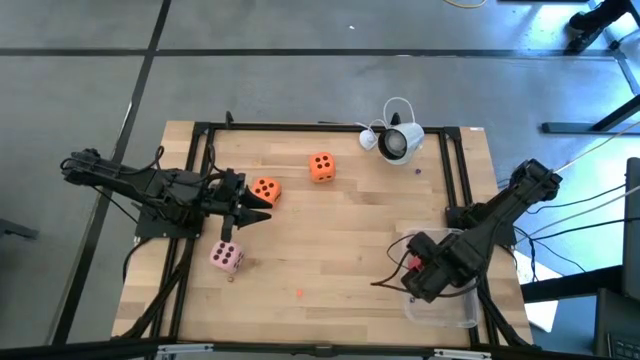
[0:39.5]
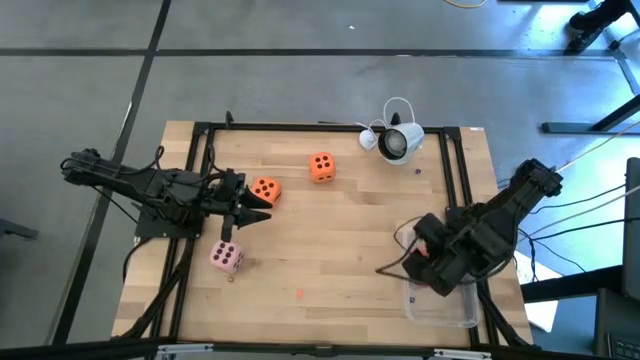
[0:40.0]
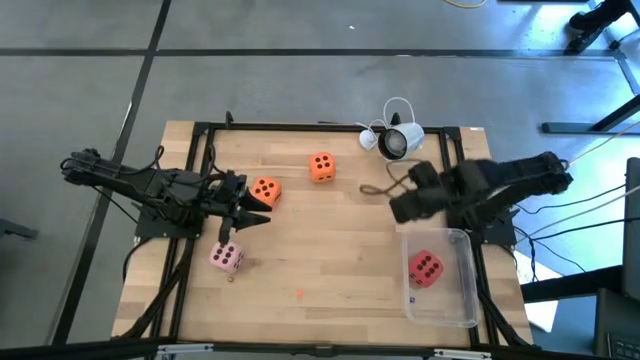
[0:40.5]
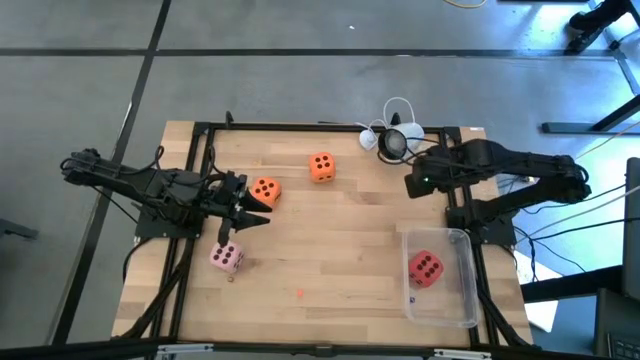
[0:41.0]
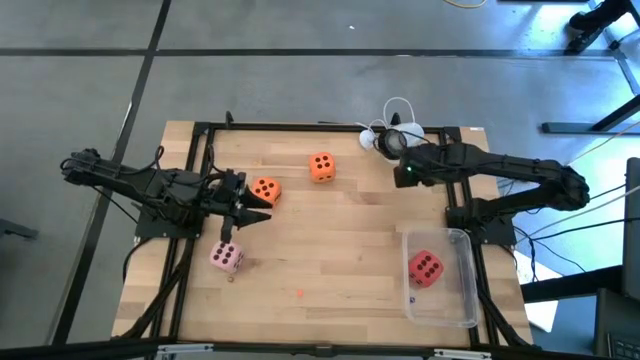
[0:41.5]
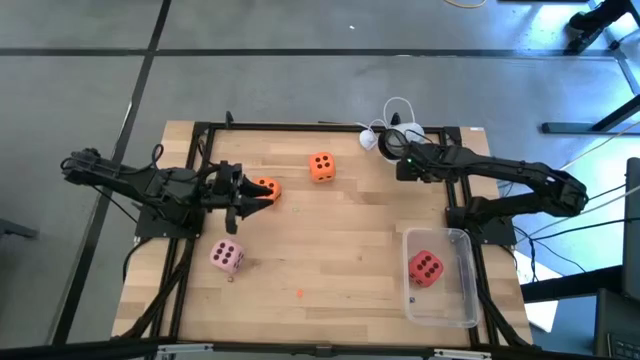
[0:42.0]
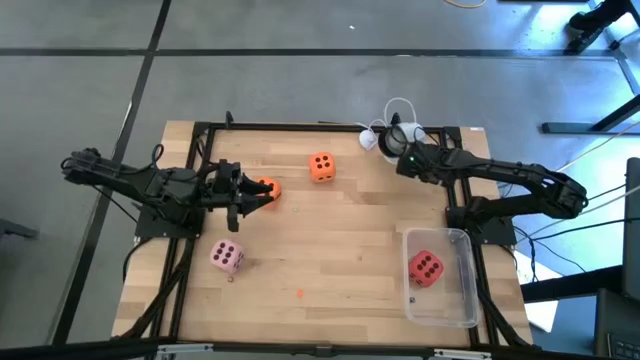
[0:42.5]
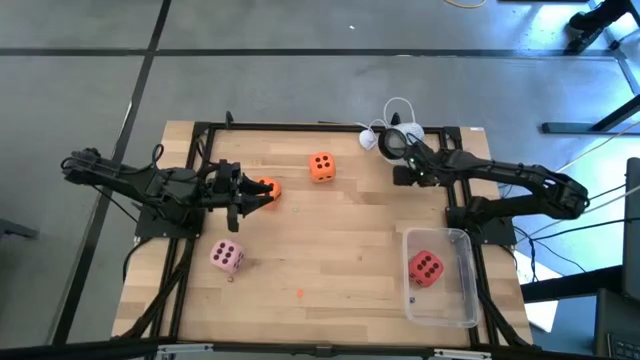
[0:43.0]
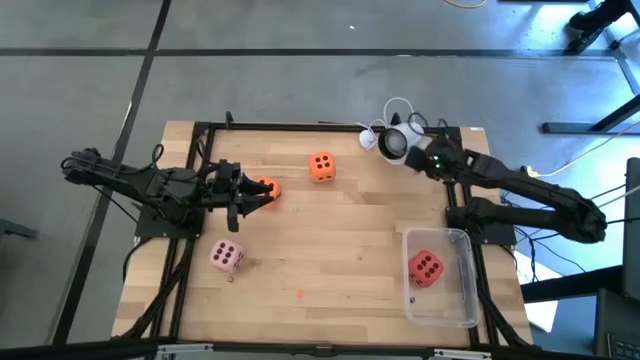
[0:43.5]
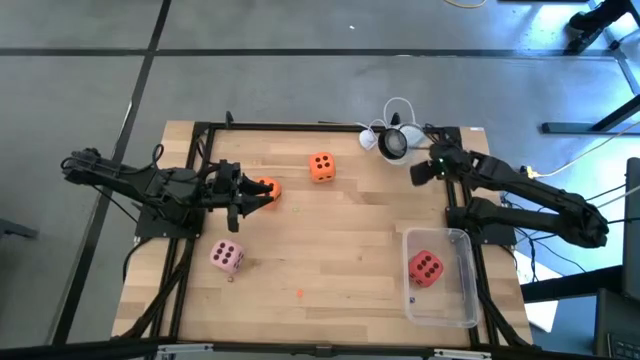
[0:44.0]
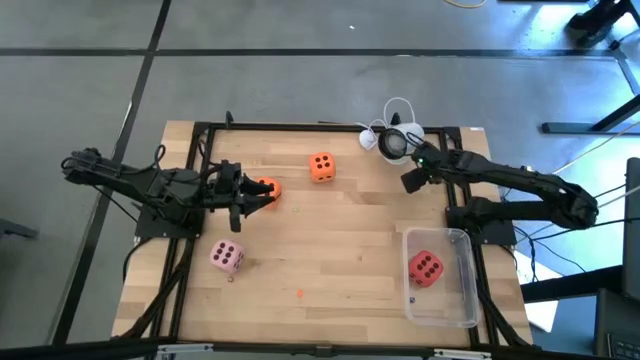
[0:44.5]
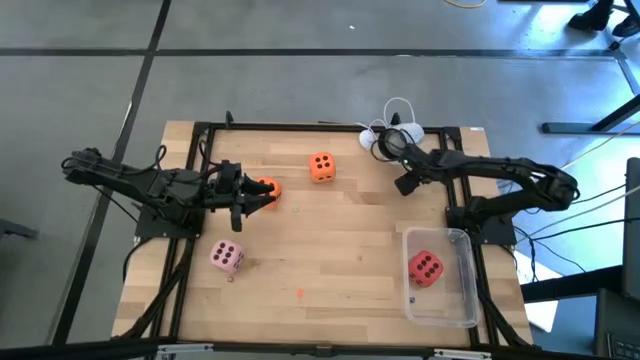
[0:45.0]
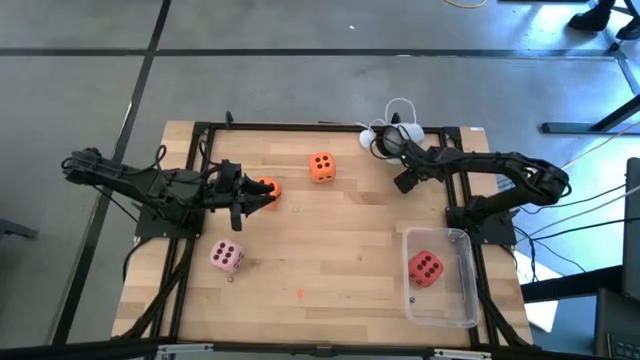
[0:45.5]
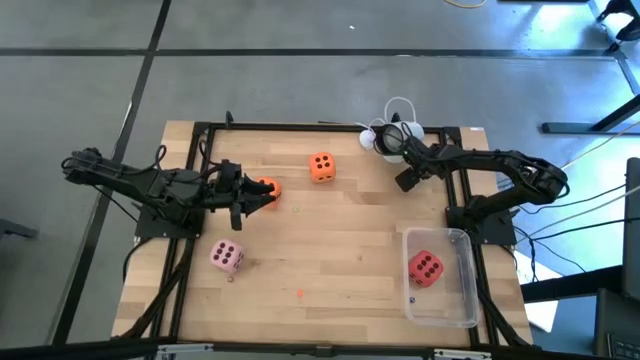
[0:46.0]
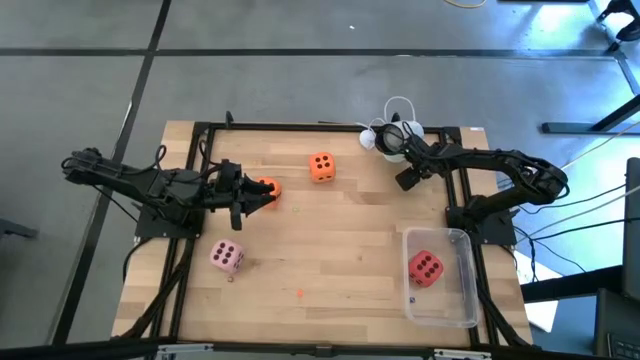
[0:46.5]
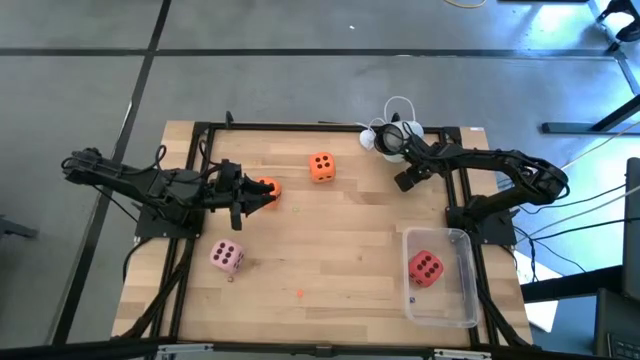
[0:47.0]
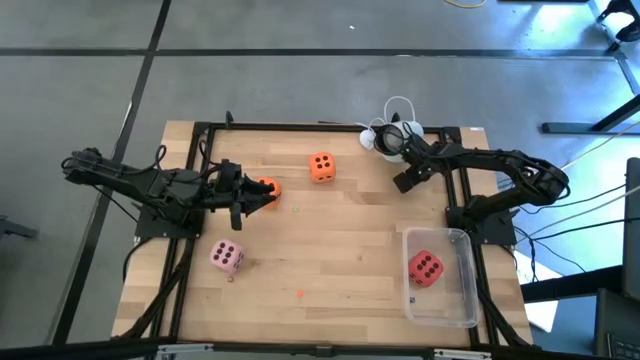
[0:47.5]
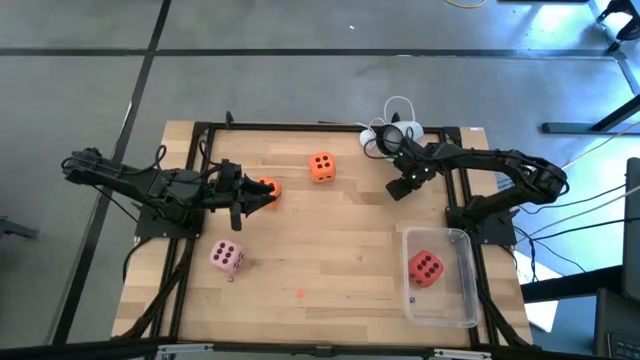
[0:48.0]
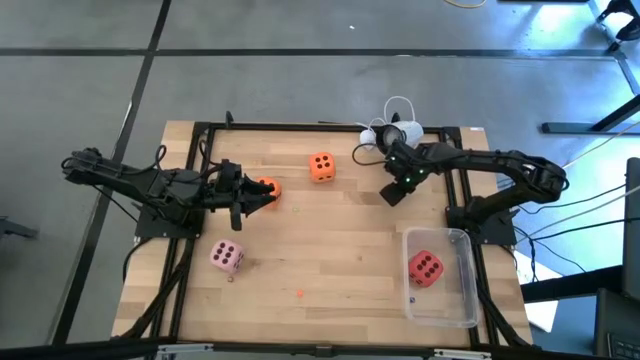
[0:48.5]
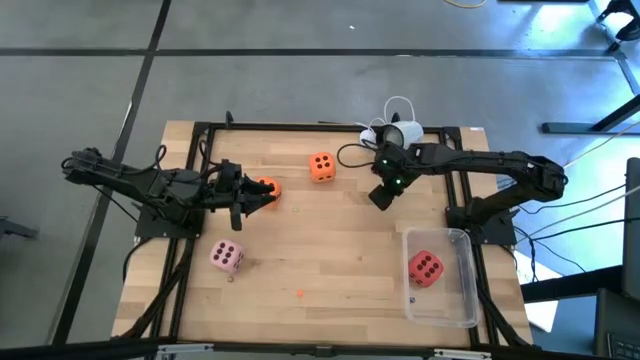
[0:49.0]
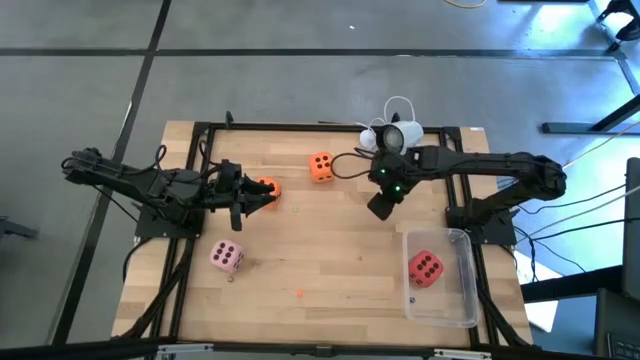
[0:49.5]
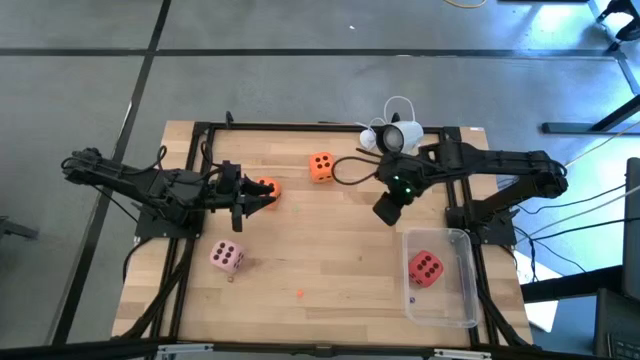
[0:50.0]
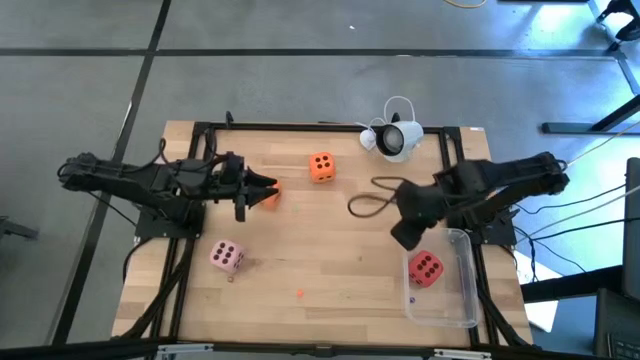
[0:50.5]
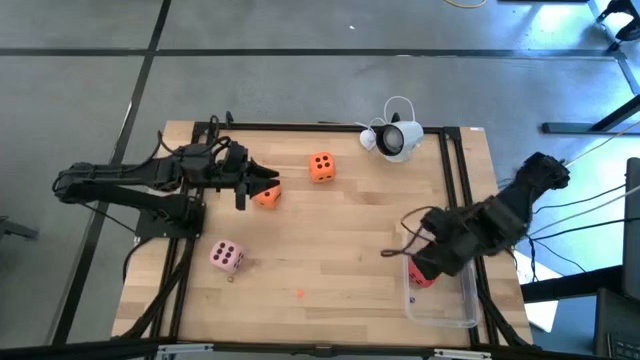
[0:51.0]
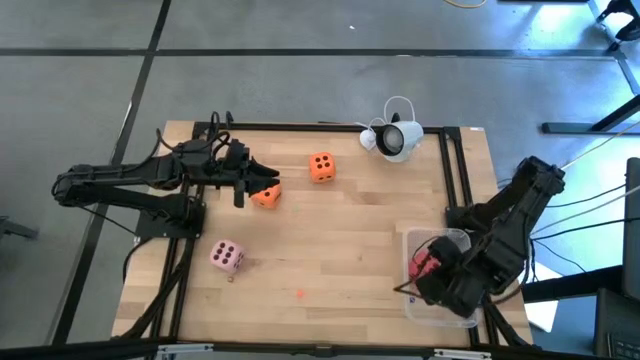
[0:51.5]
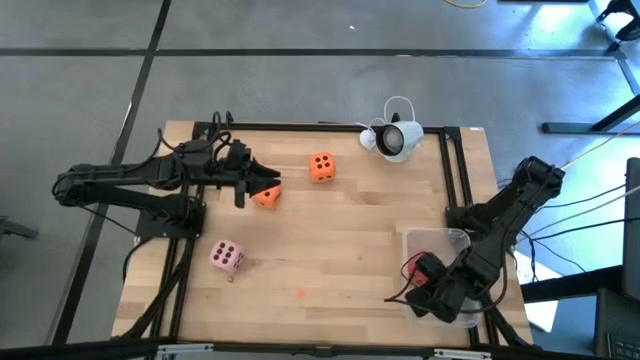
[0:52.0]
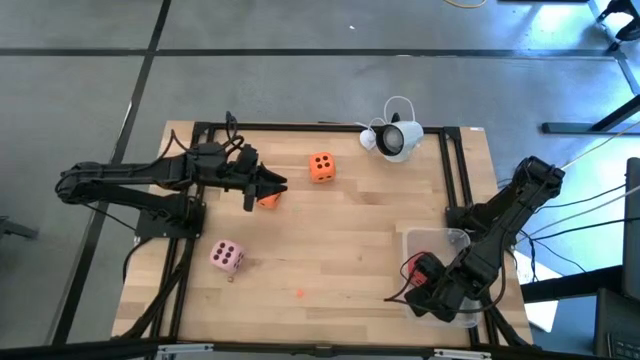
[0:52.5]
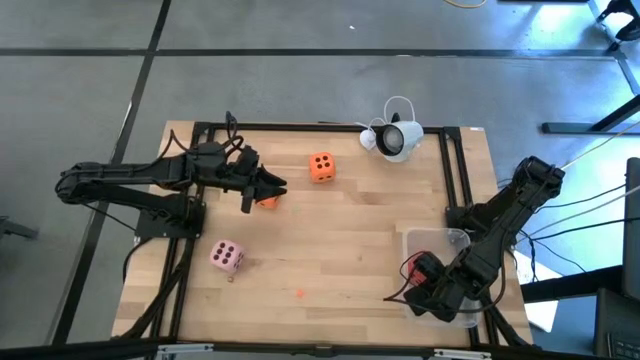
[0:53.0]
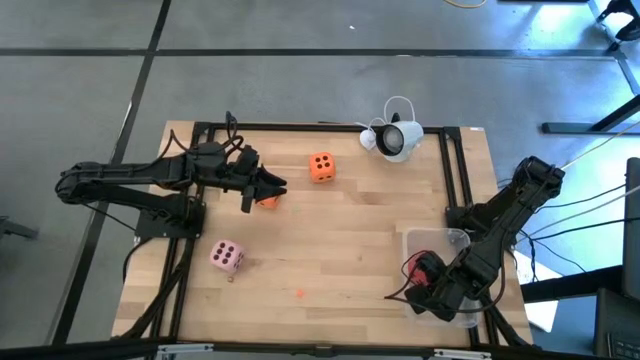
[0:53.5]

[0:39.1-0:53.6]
Task: Pick & Place Dice
Put the small blue die into the transparent bin

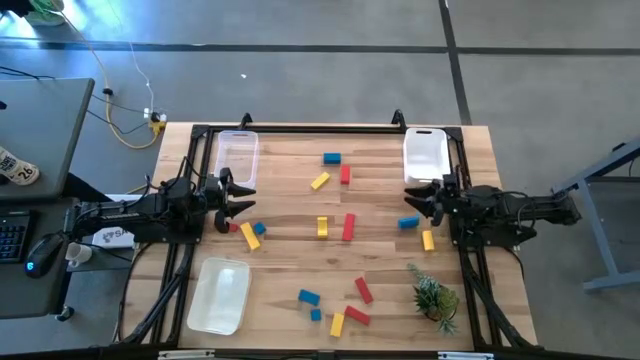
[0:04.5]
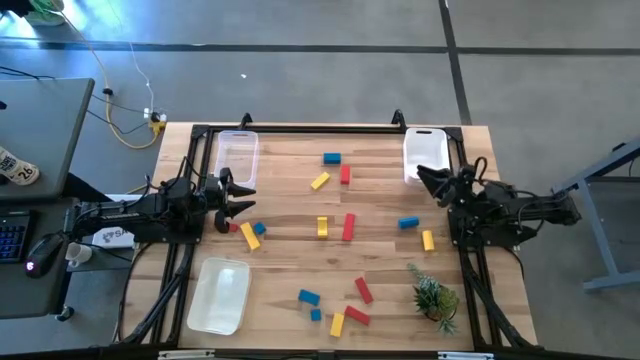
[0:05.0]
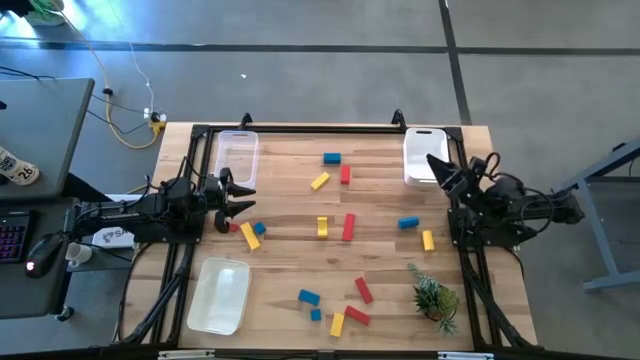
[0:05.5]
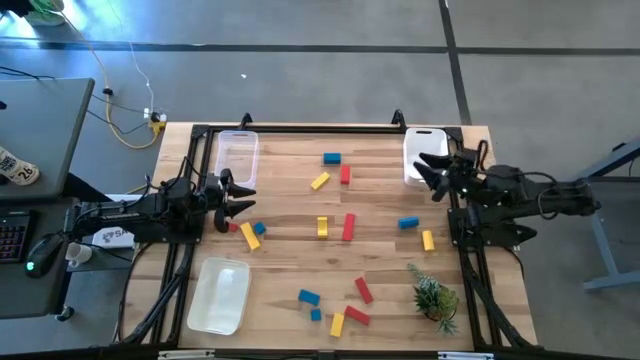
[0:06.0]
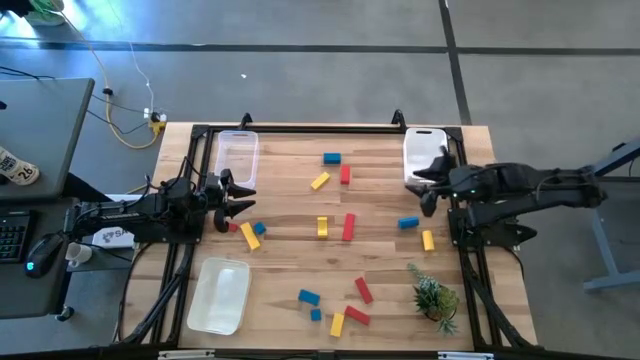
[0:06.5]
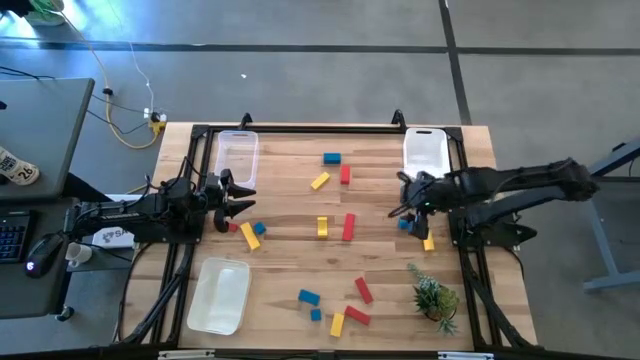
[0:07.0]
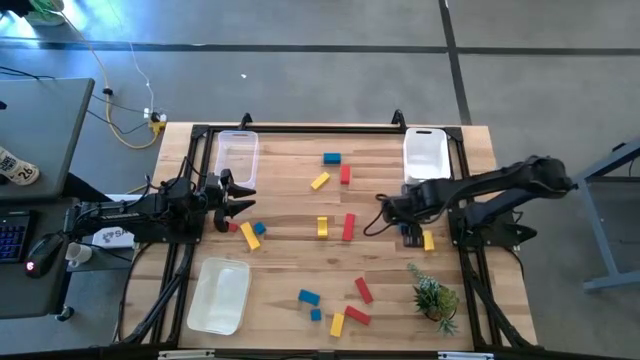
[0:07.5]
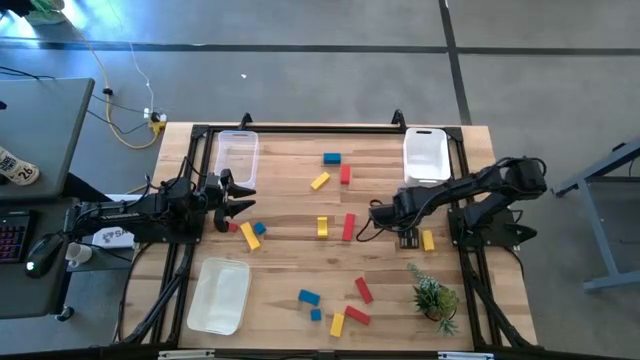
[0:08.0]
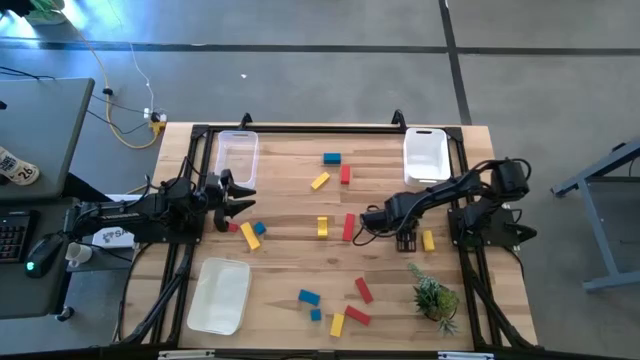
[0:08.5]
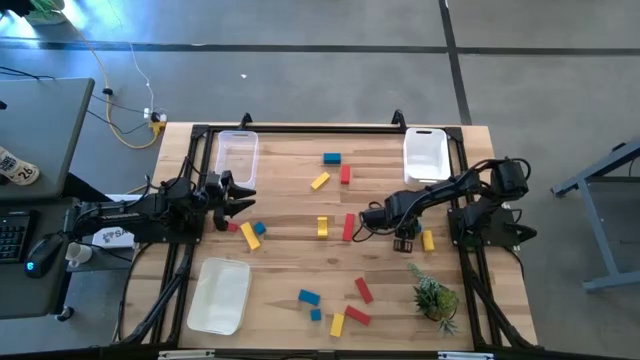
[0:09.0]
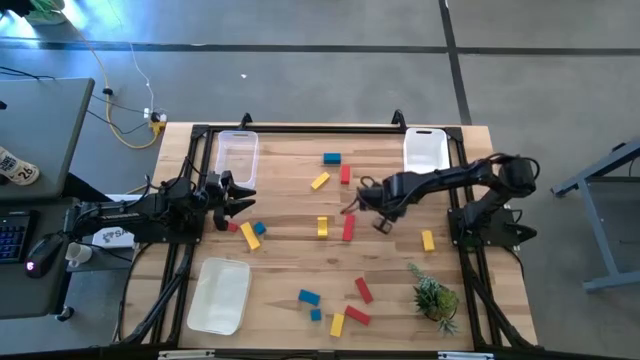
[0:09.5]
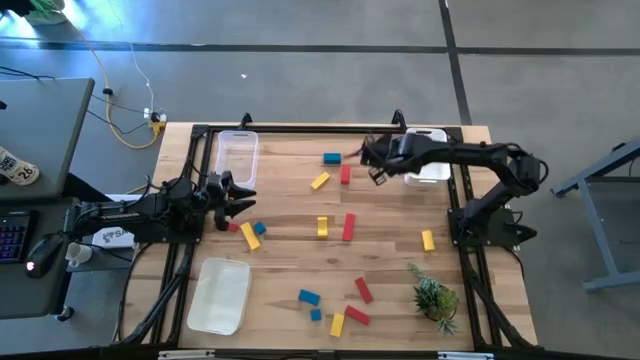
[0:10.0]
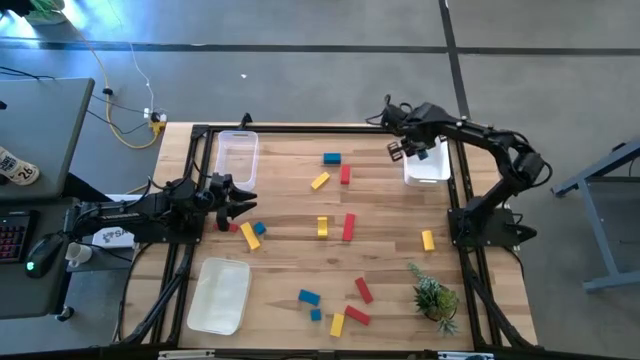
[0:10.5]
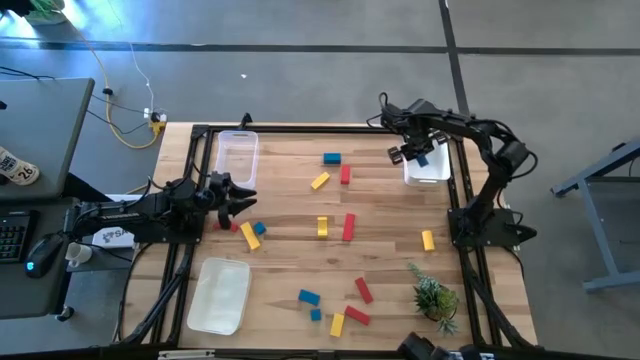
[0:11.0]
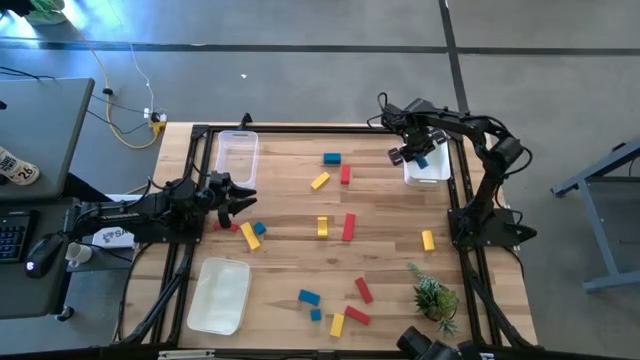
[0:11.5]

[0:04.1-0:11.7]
Task: Sort & place blocks by color
Put the blue block into the top white bin
